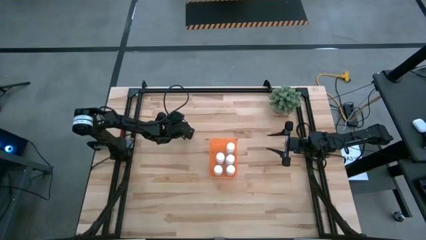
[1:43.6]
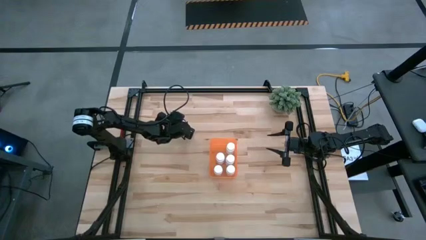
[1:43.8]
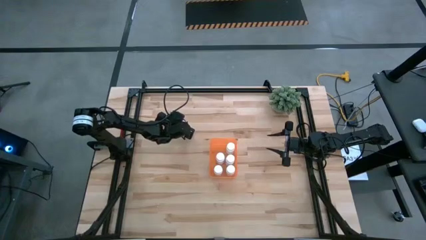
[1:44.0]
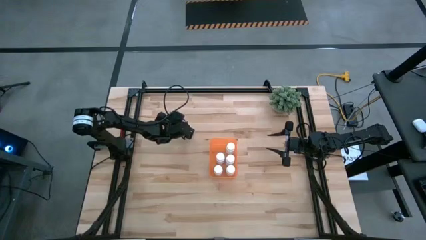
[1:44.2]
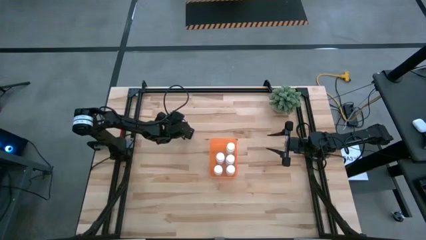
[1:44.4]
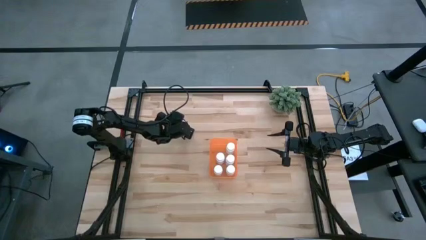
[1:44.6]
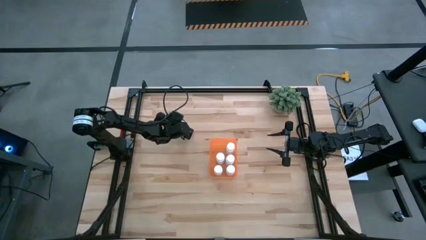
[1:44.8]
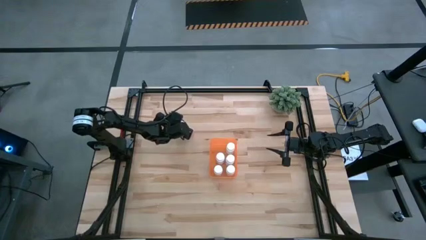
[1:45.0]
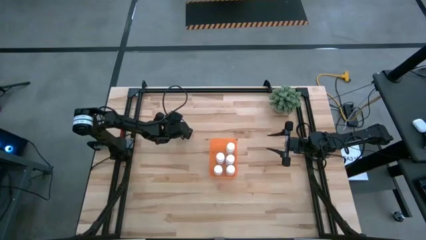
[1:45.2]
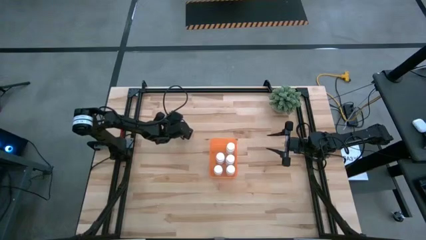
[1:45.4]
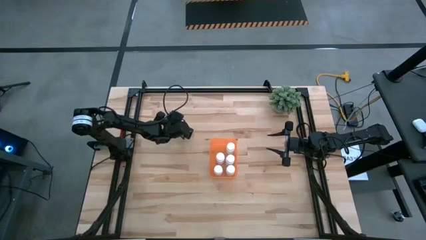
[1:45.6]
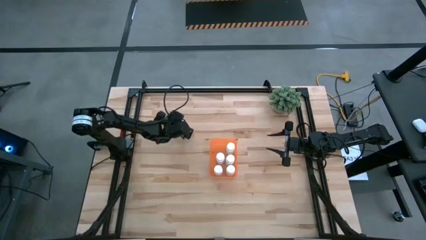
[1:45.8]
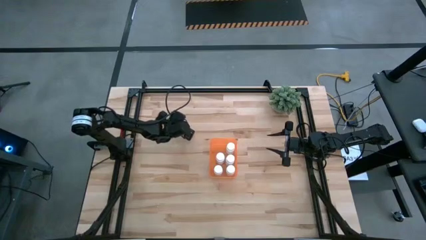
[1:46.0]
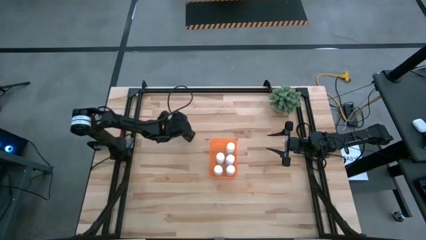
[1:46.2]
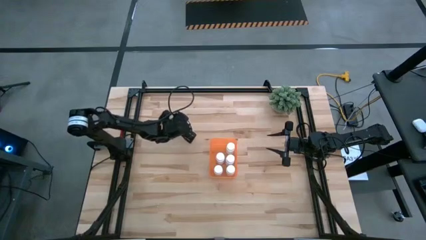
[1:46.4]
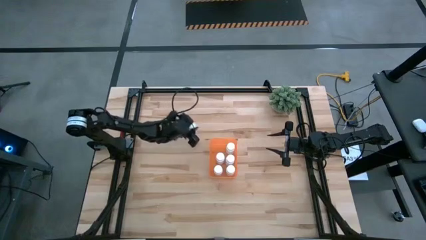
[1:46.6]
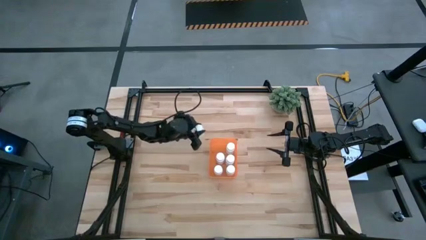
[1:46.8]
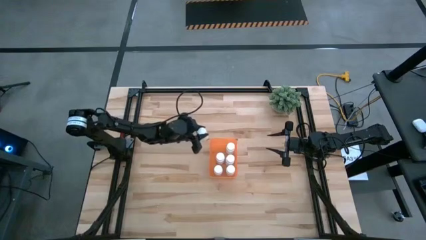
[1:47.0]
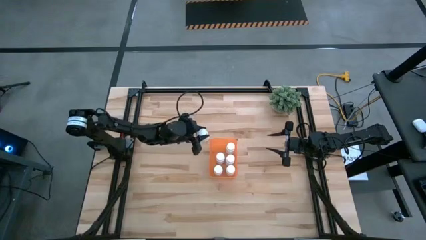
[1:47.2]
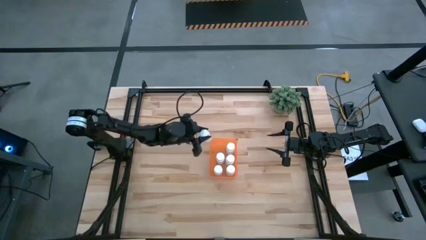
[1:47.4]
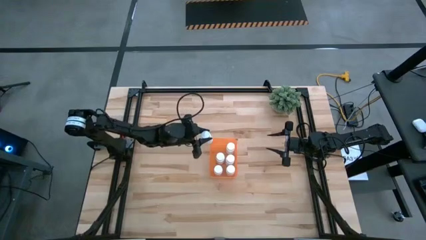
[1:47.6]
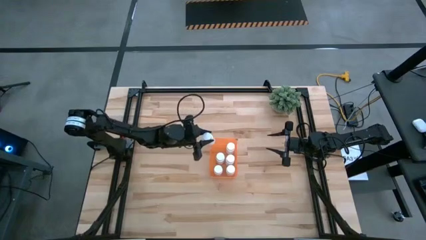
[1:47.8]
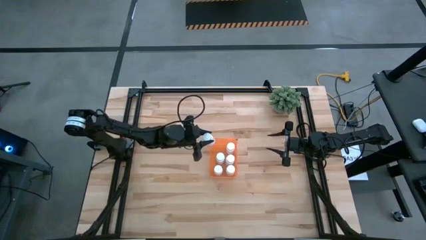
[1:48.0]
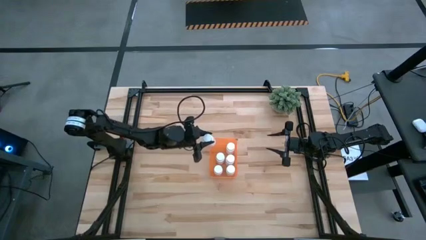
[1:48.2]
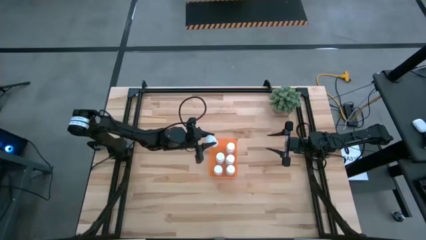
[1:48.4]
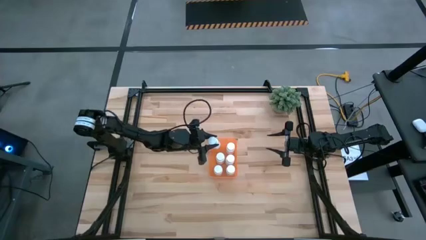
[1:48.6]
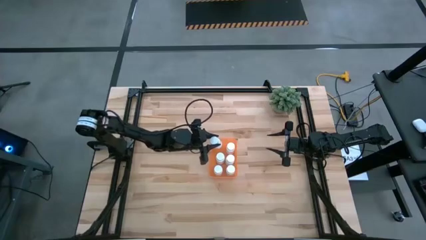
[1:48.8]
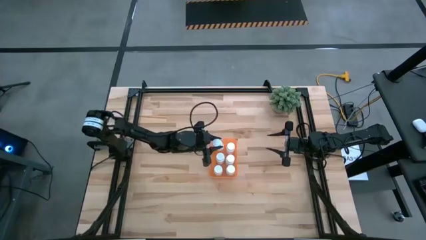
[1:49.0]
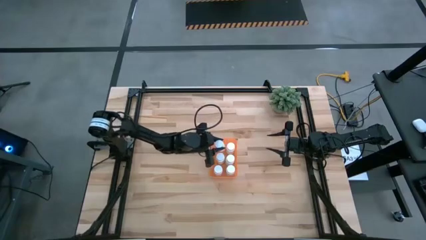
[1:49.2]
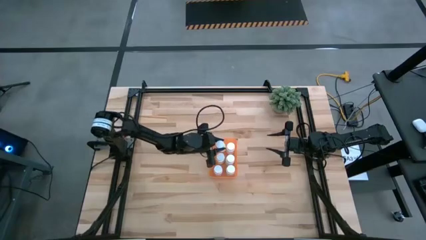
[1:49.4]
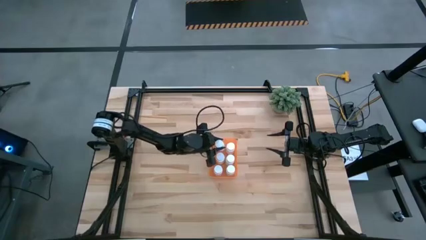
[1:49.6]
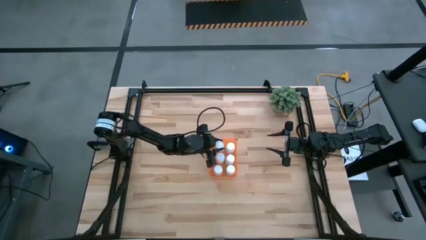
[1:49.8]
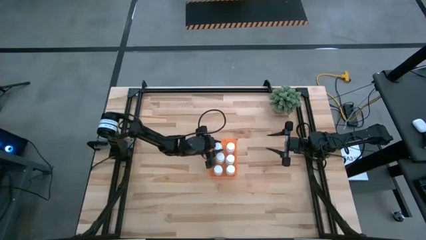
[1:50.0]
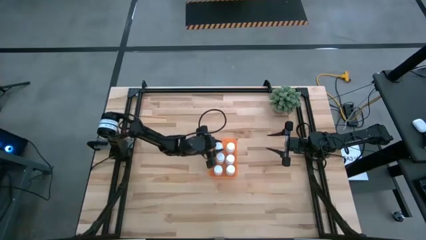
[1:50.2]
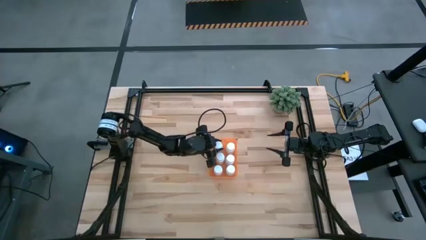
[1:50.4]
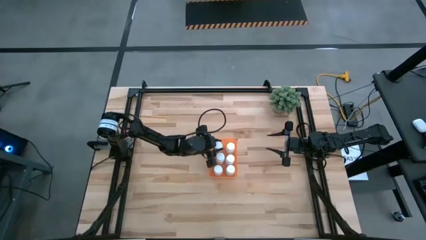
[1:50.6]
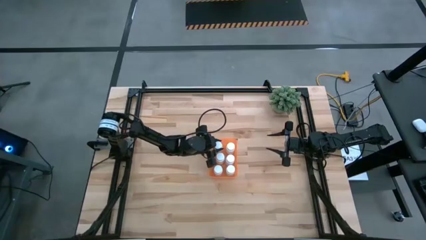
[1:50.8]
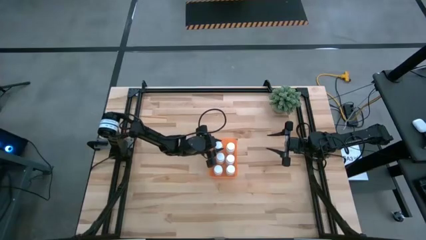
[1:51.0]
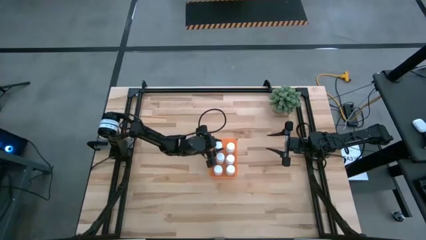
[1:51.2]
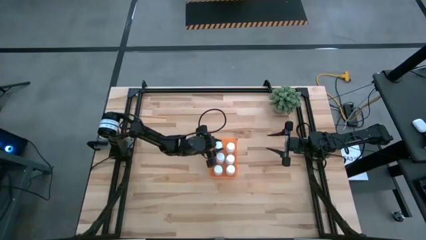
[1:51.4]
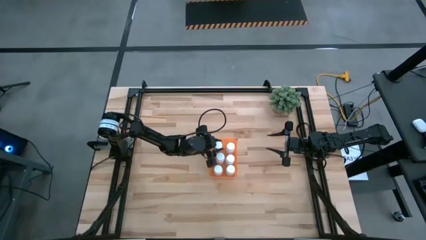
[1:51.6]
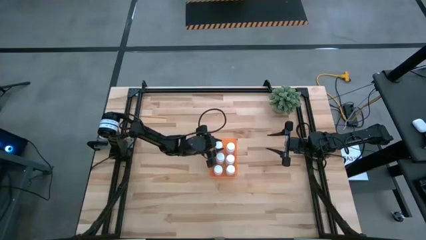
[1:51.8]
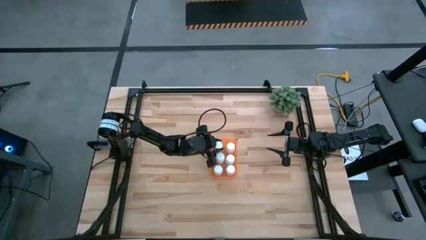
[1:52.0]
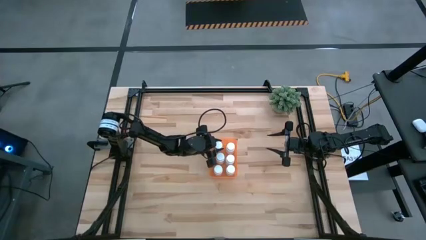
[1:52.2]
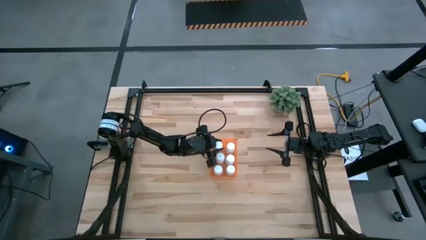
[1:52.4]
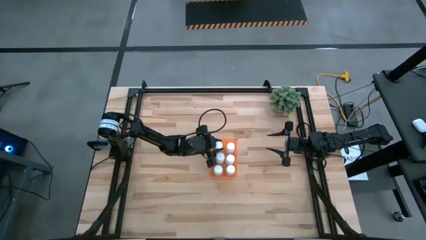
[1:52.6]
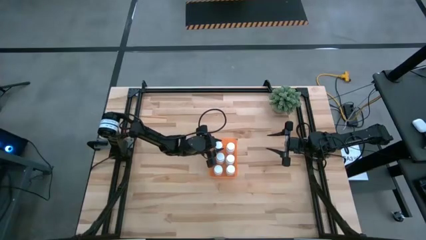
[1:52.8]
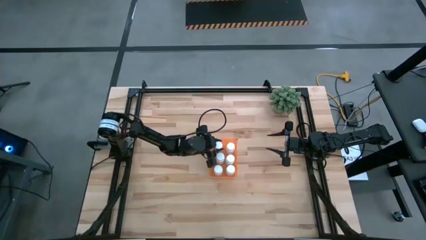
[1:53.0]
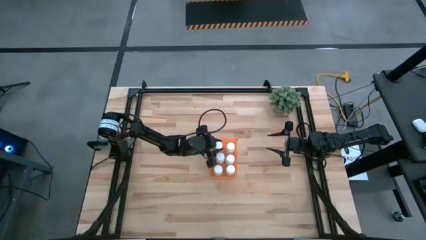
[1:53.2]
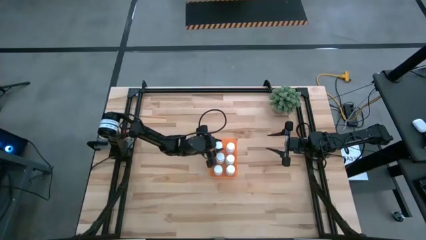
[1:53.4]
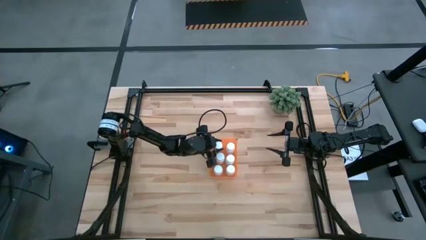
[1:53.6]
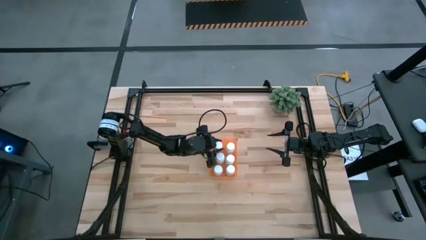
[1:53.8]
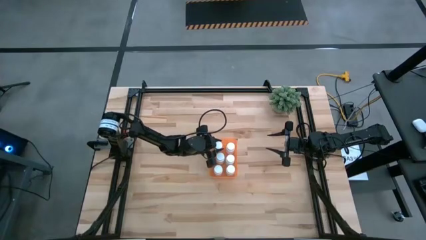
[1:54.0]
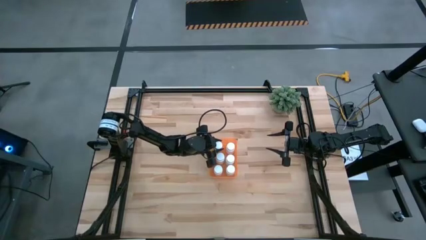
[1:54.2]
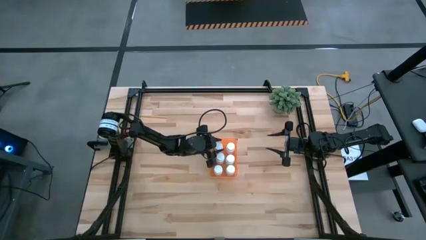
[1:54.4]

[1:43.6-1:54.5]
Task: Pick and place pill bottles into a basket
Put the white pill bottle into the orange bin

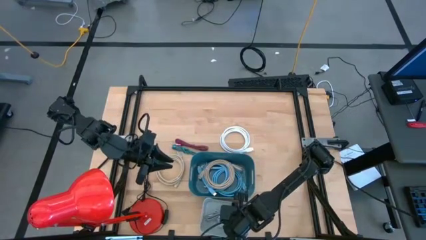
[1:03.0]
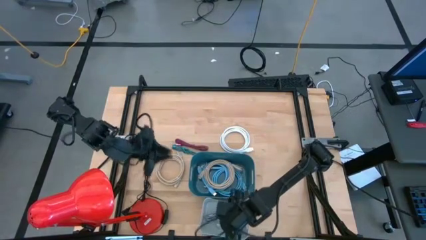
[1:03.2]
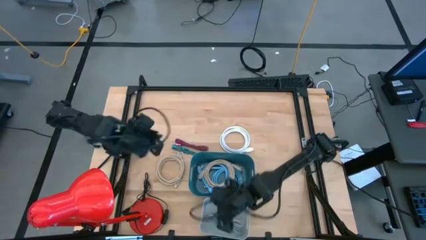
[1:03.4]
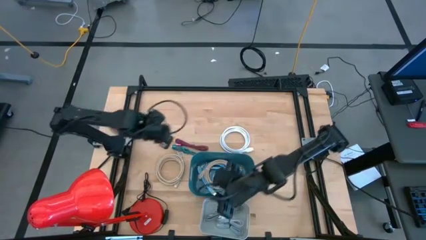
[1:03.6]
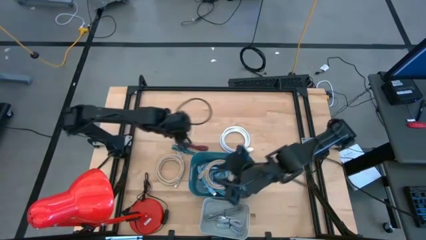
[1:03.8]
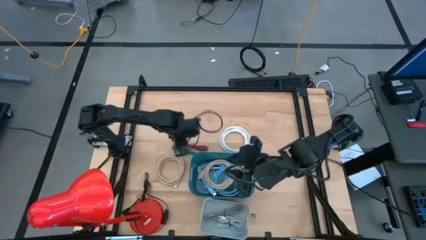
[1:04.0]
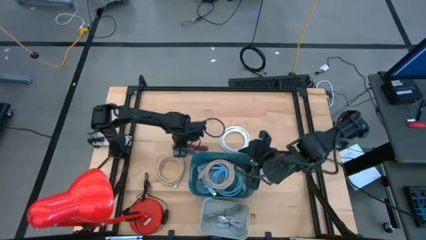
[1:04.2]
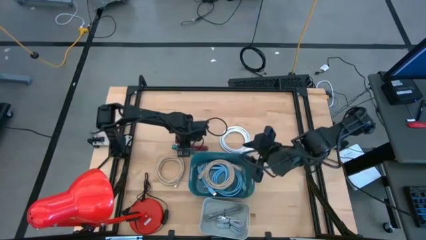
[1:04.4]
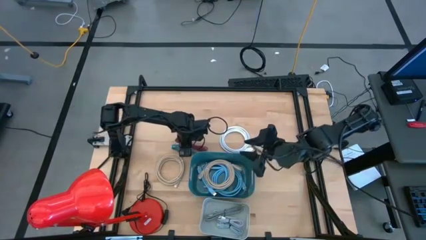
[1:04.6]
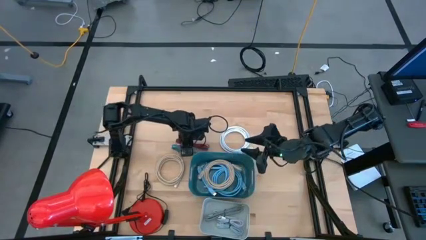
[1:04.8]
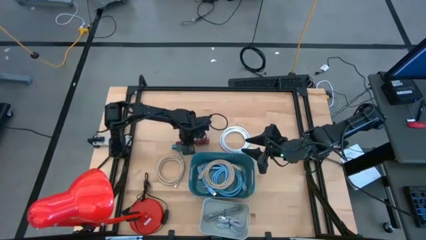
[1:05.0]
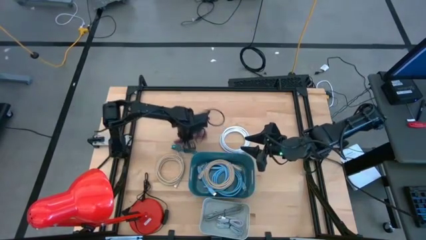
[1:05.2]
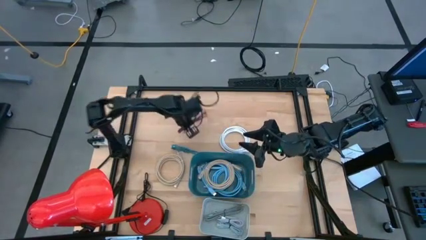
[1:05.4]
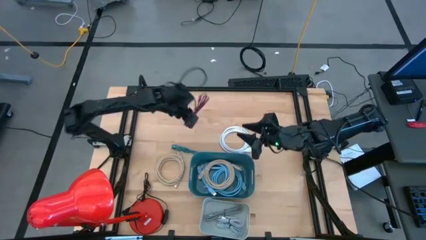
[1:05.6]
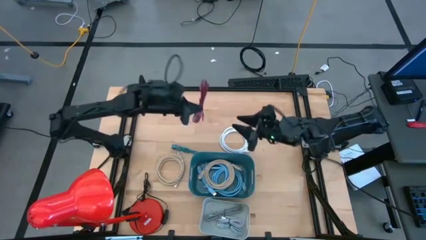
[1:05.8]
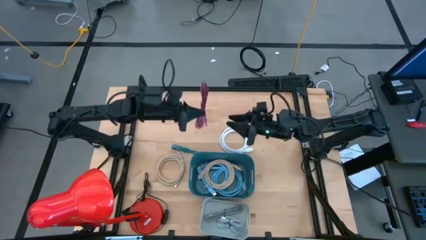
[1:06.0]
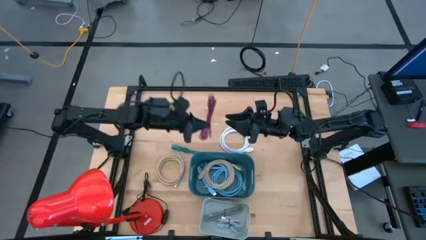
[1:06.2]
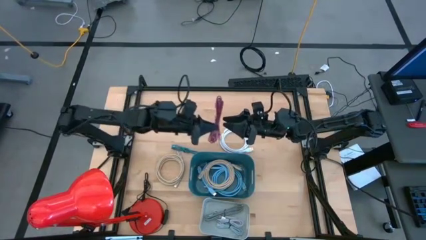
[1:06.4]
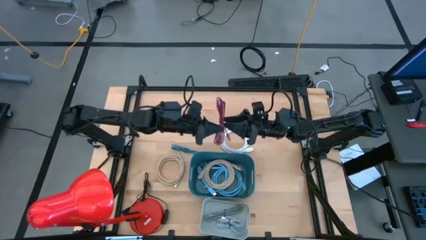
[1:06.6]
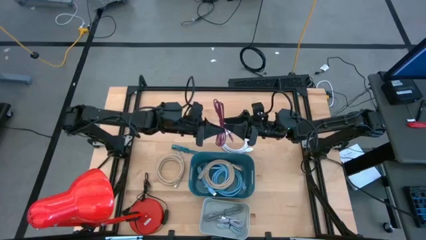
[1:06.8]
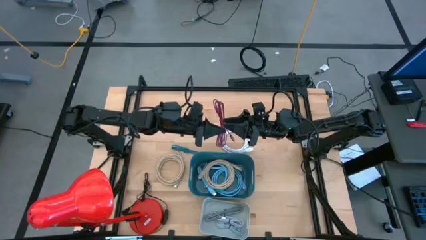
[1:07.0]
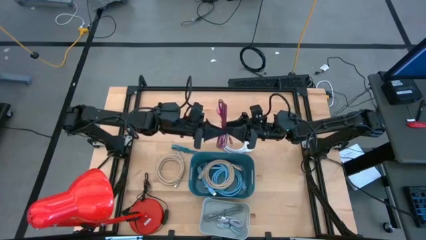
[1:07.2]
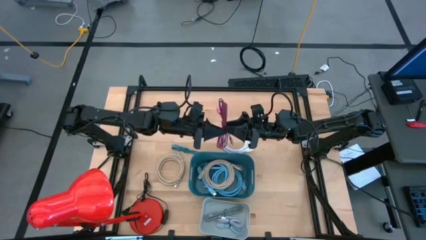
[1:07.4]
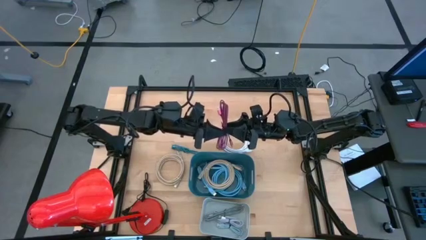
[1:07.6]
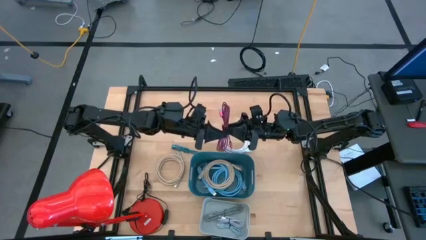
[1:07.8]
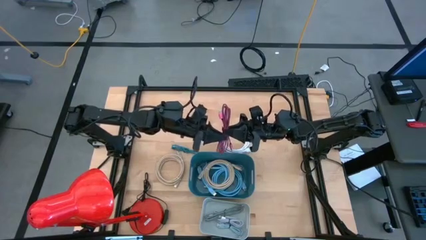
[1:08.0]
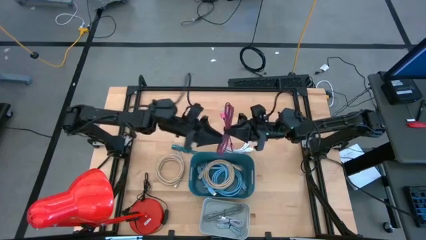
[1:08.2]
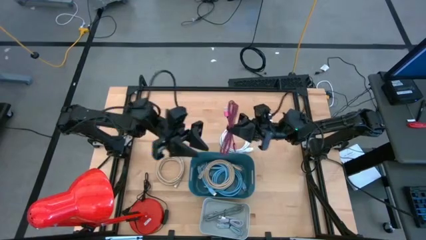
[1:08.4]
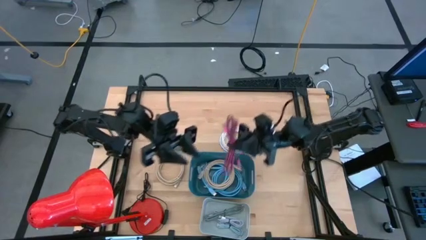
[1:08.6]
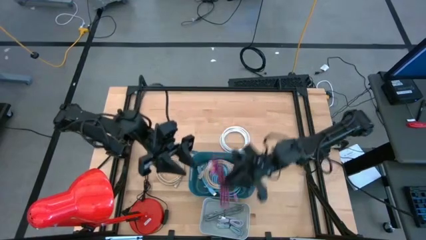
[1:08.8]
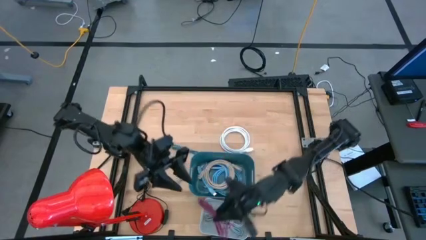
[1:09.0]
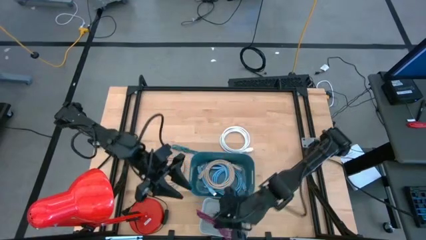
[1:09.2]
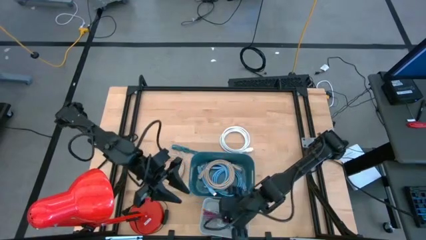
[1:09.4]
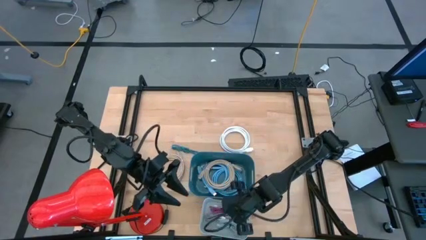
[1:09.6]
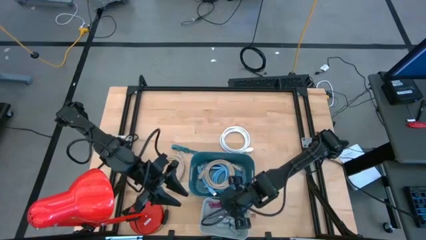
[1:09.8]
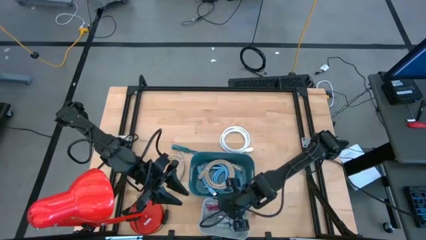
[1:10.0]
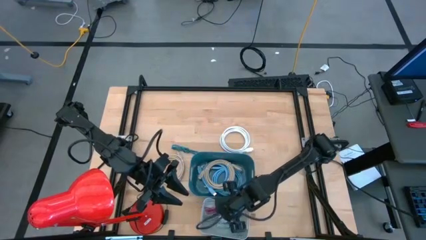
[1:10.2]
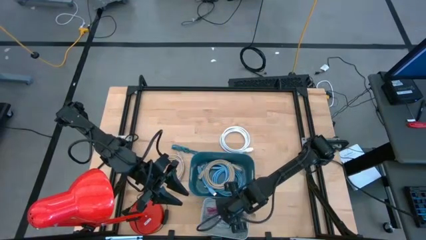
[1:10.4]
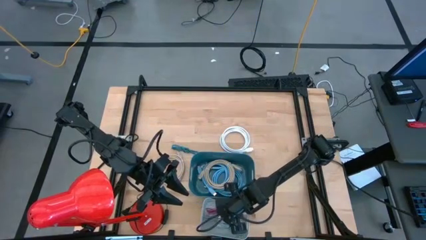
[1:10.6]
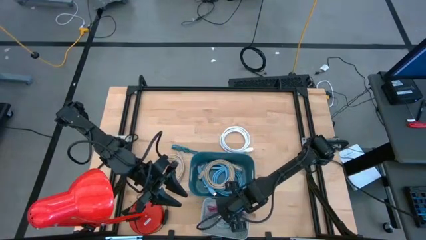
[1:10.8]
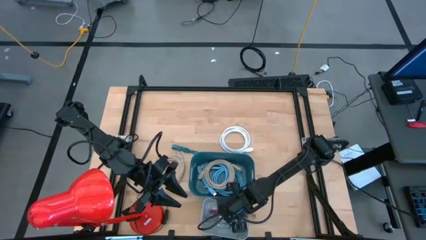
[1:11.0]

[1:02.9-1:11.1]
Task: Pick & Place USB Port
Put the black and pink USB cable into the gray bin
